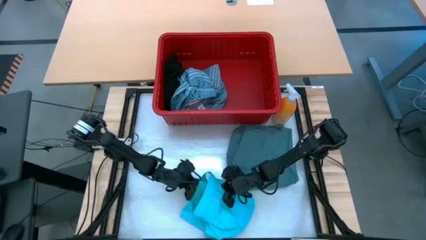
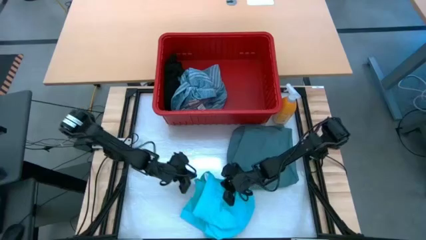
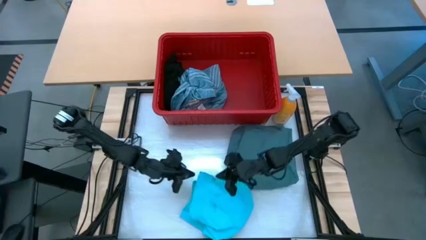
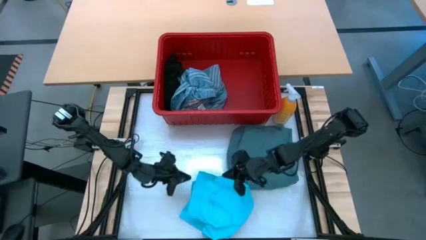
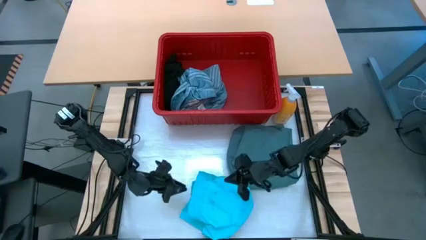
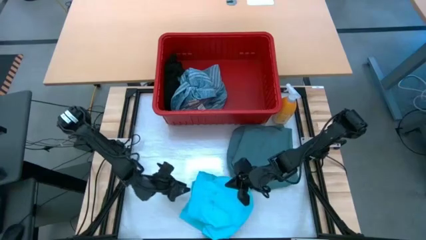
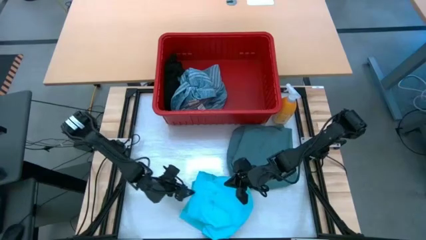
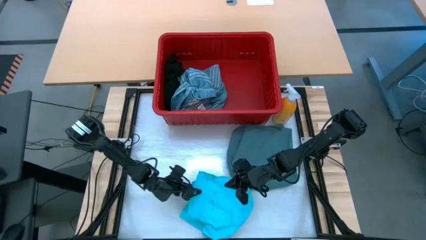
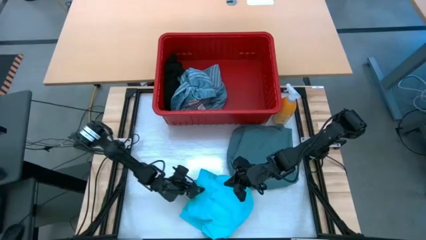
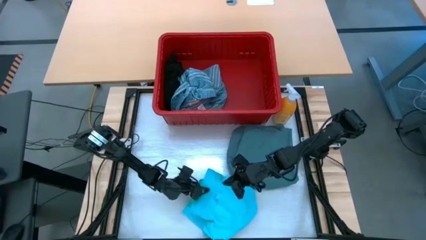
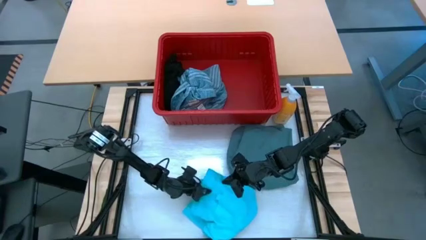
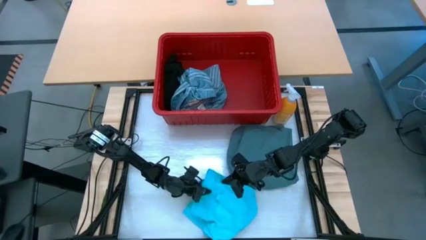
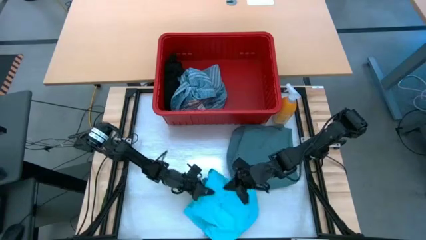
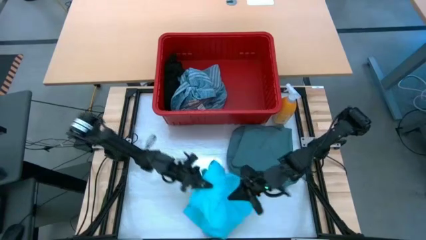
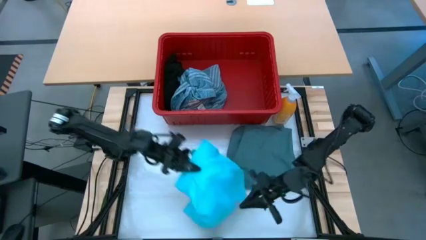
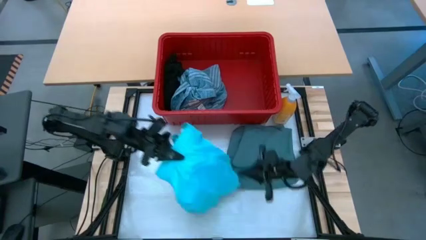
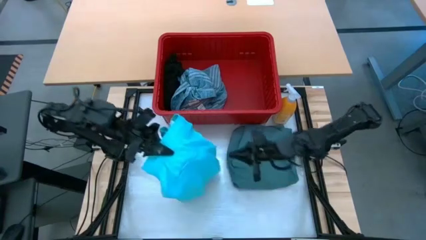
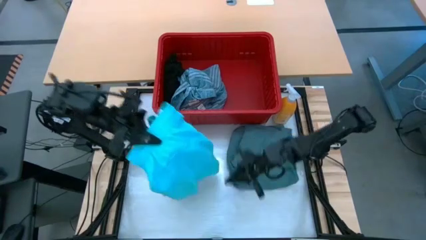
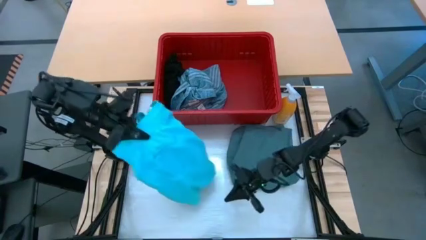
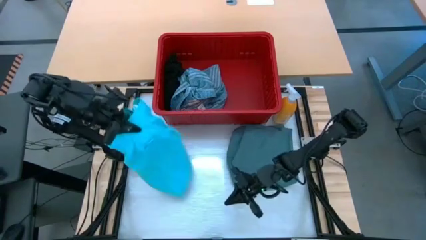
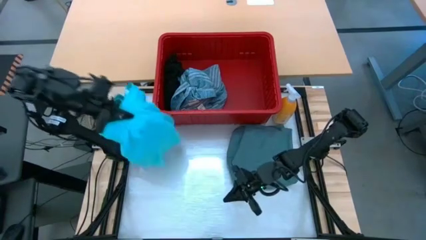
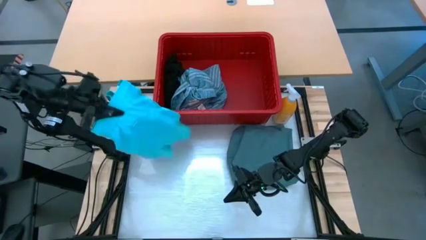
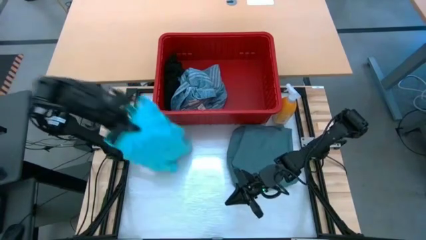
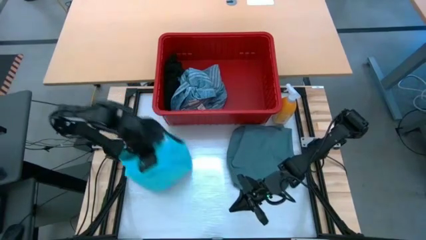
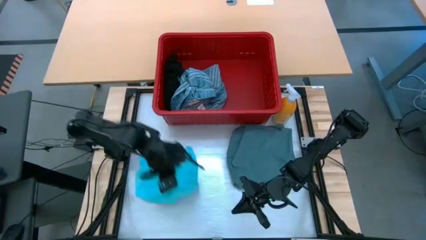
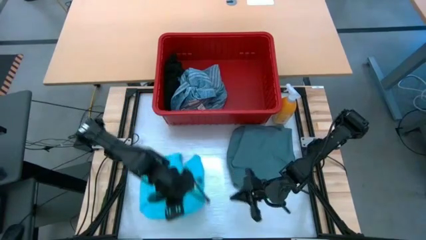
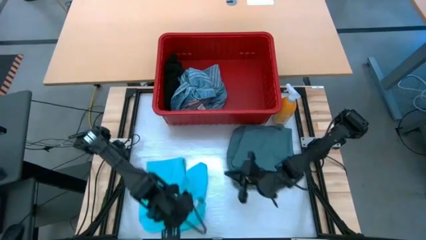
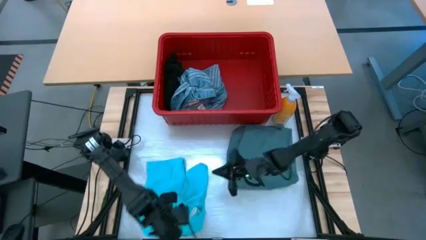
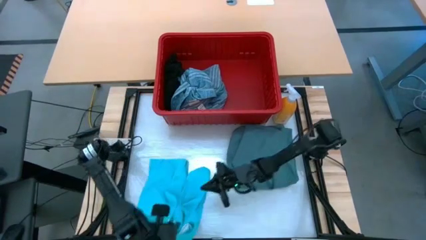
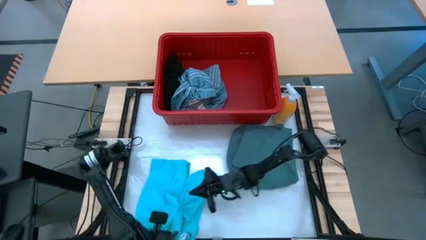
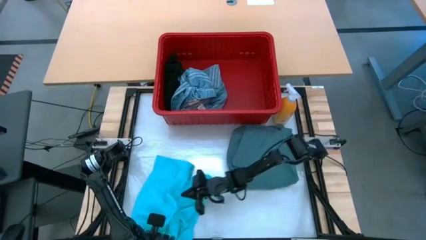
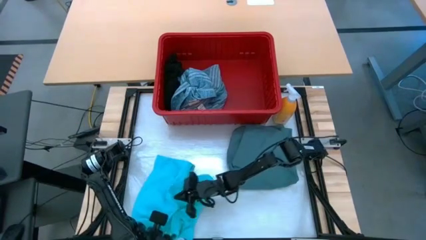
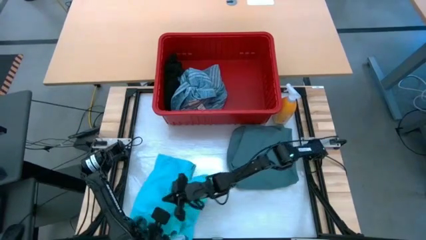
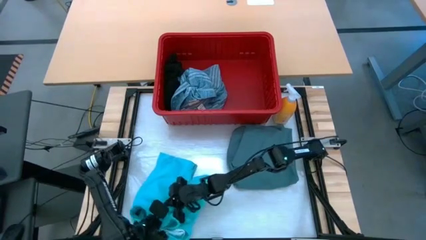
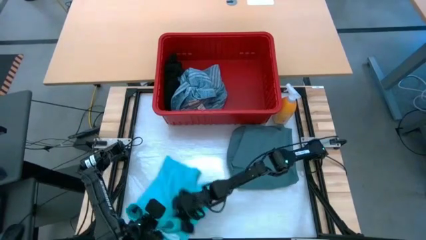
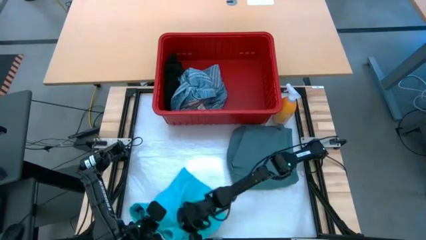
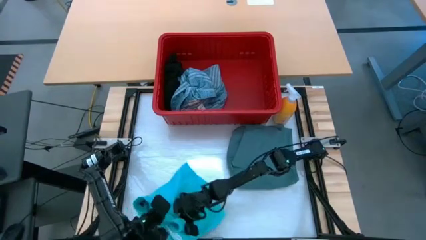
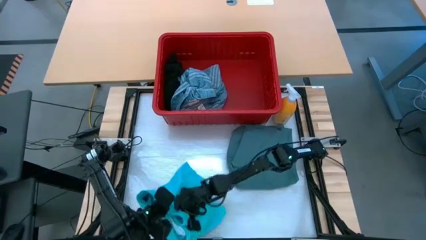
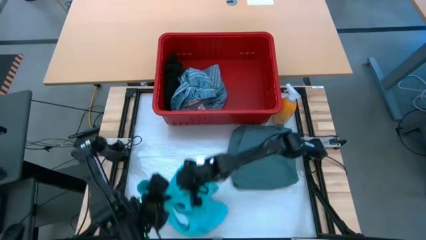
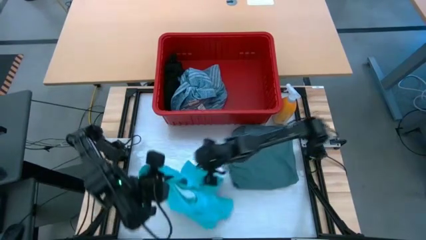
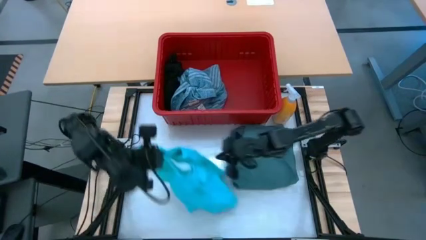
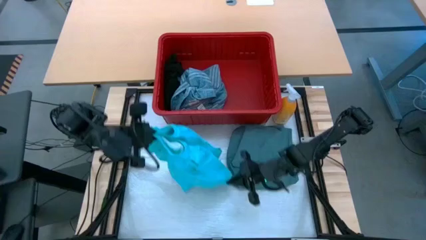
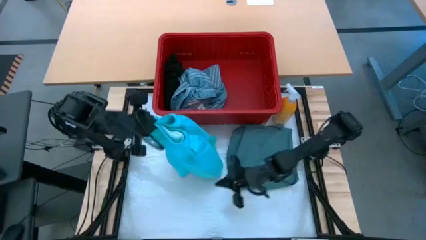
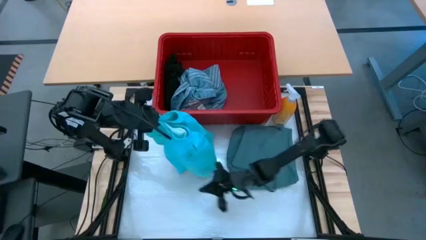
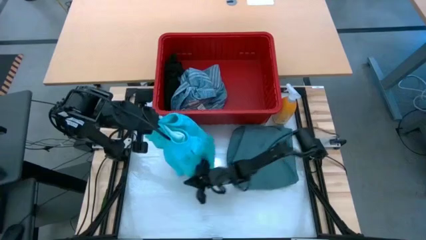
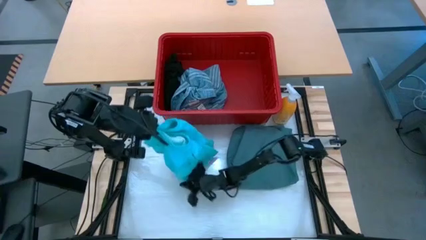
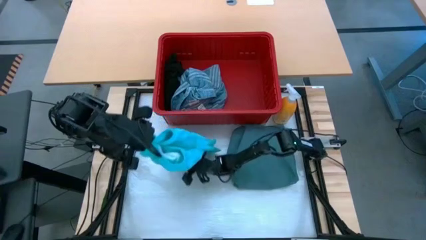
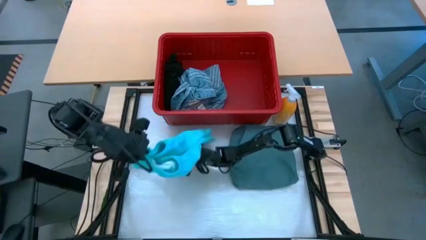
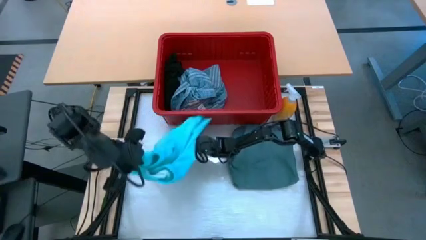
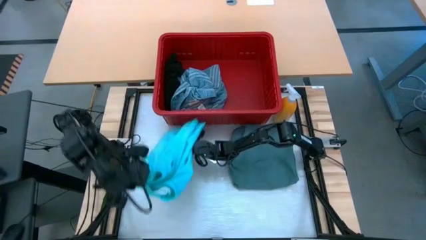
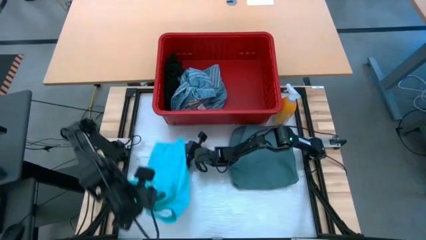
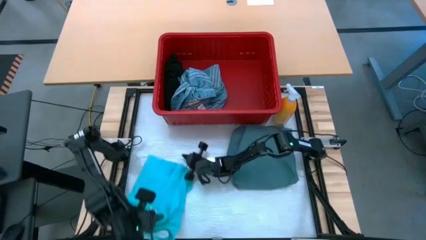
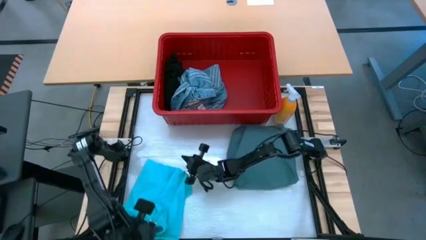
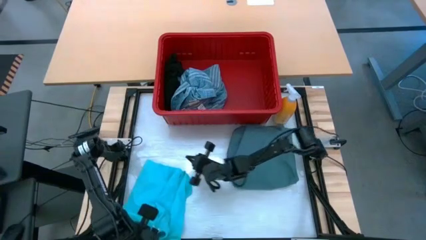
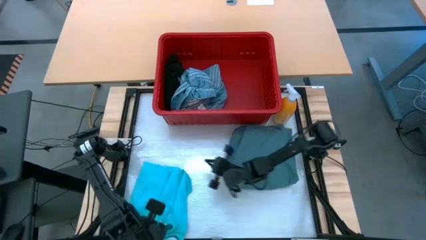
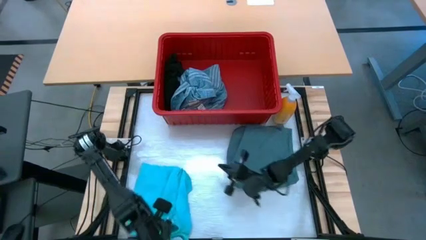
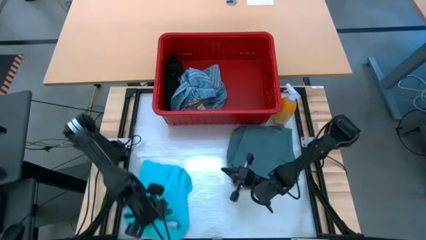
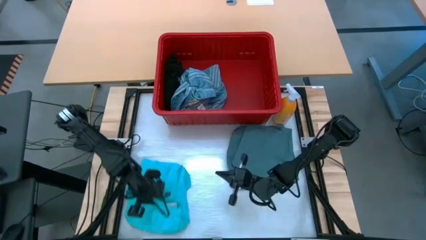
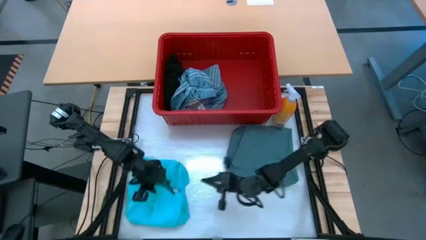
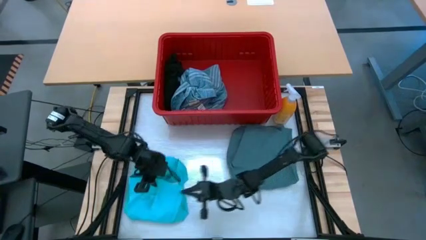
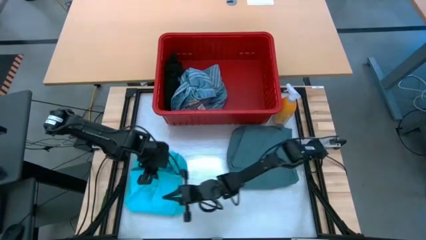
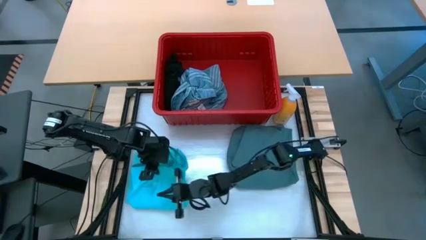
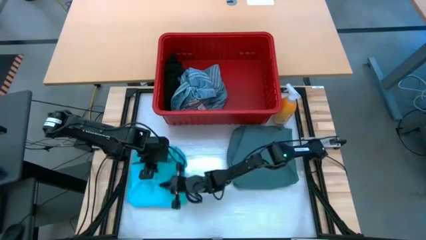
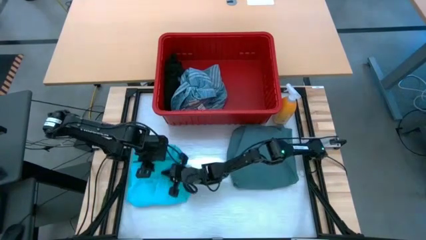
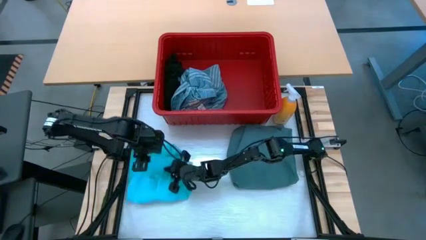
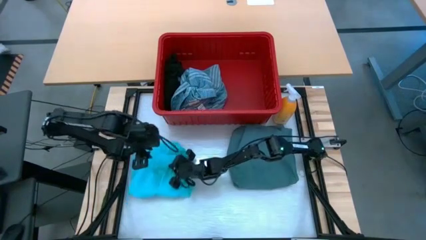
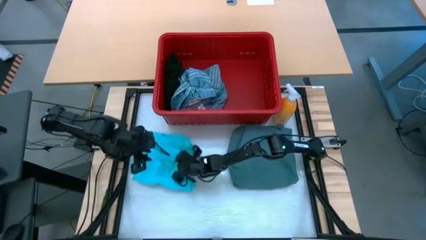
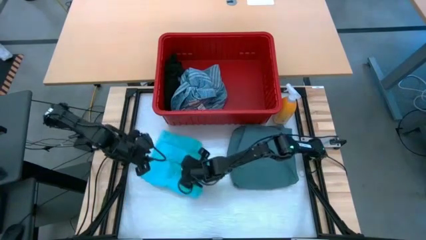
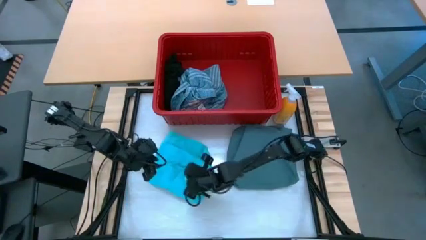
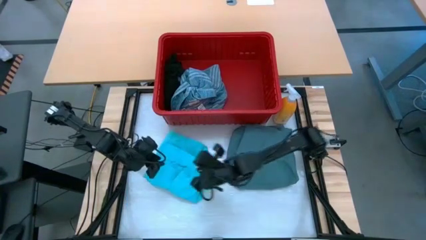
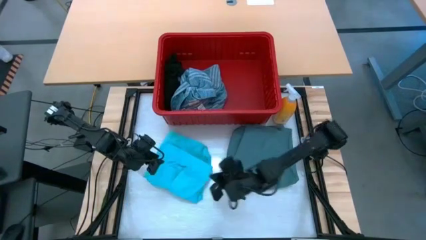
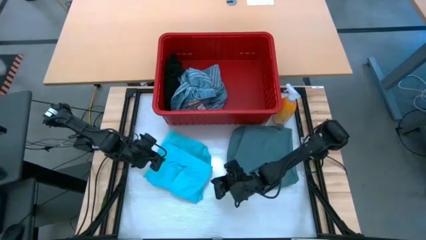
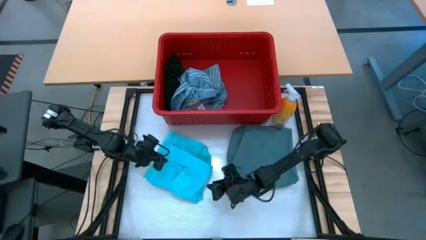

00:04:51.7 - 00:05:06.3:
Task: Fold Laundry from Bin
Fold the sky blue shorts

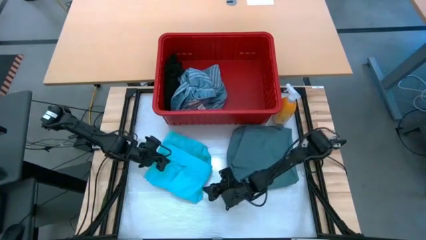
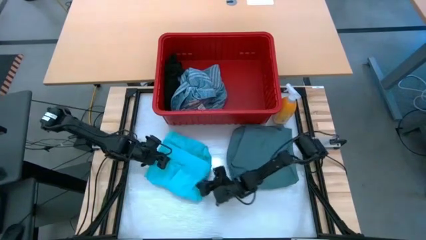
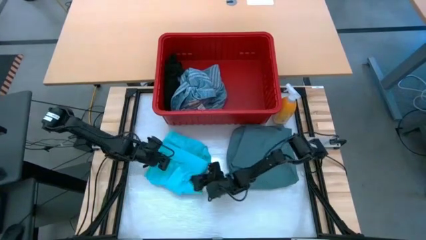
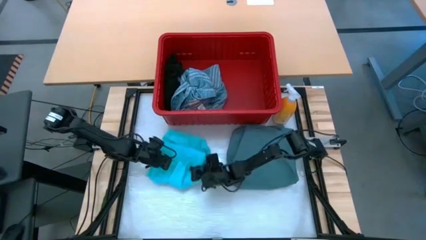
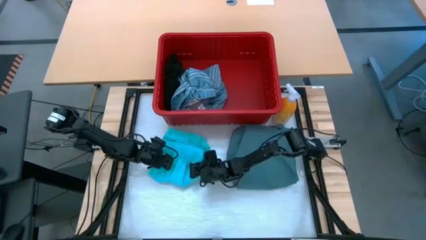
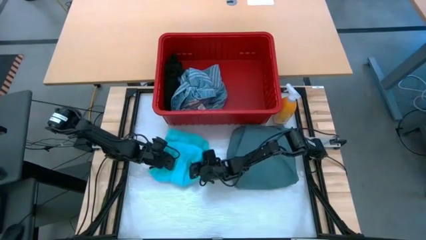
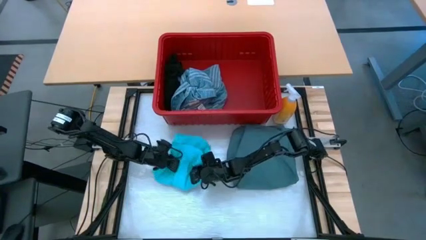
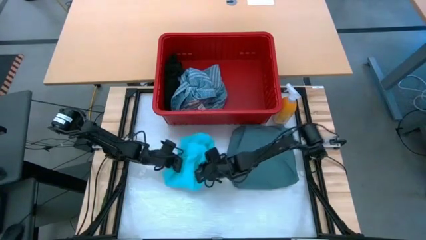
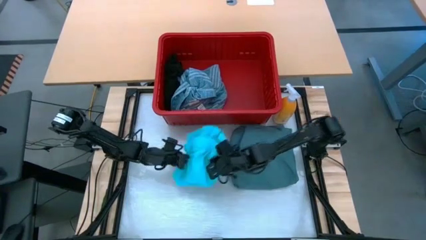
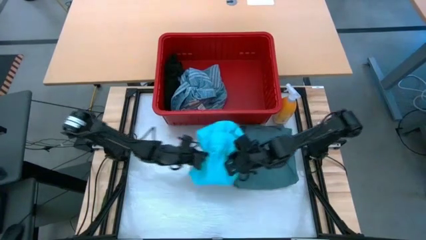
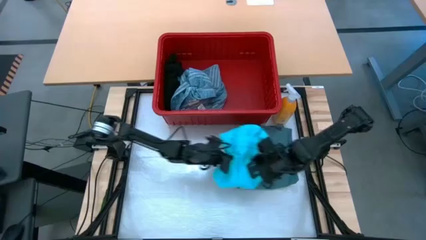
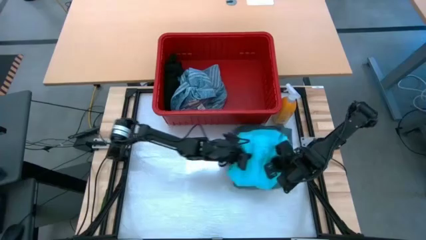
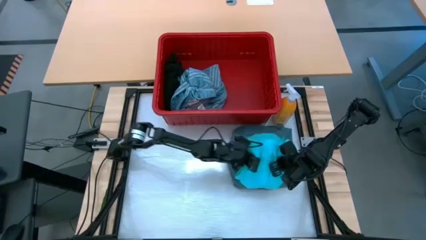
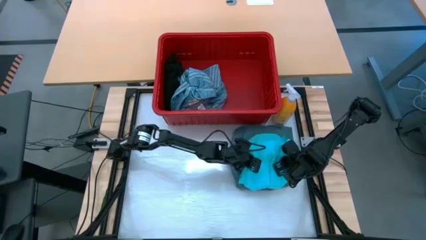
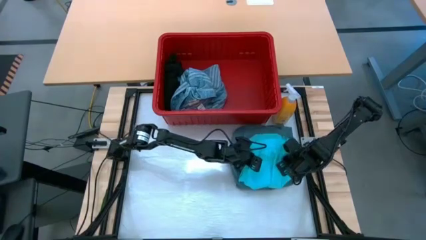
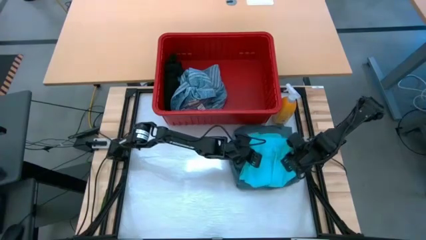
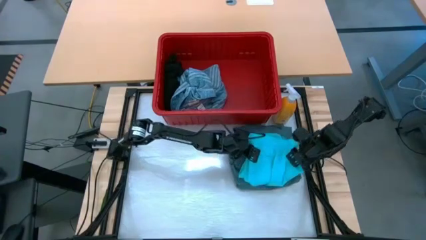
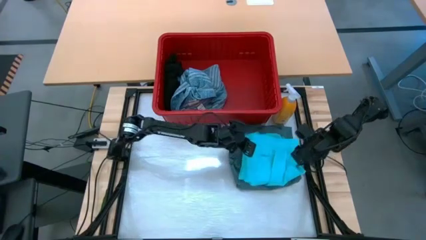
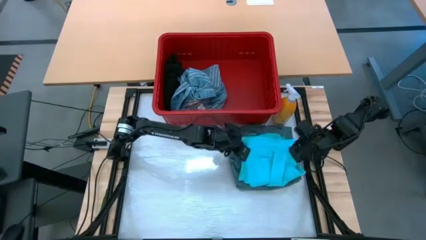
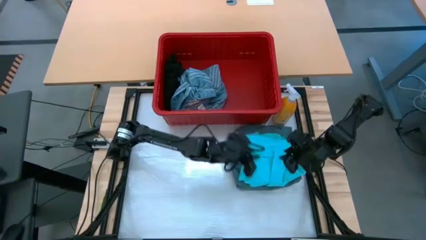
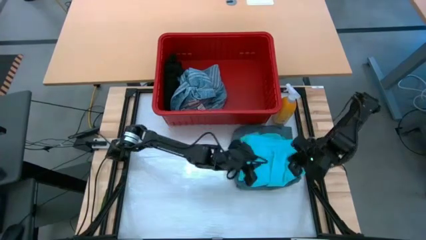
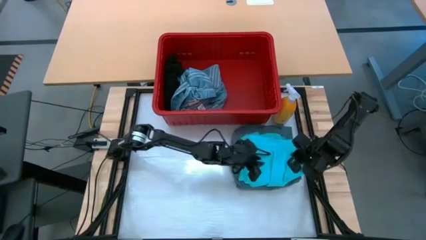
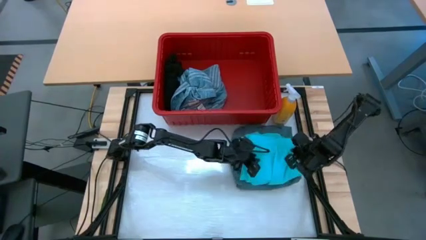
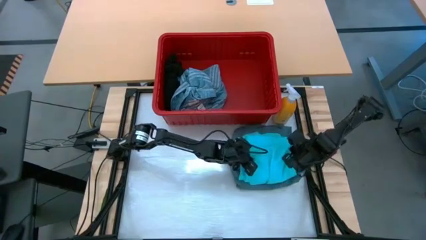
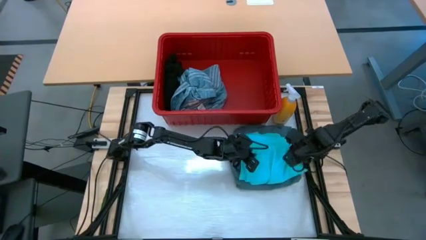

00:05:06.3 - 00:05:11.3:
Stack the sky blue shorts on top of the light blue pants
